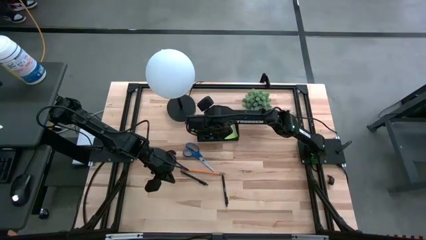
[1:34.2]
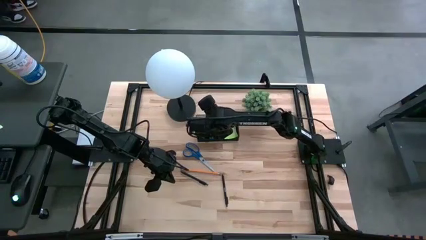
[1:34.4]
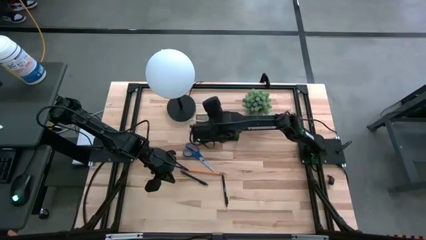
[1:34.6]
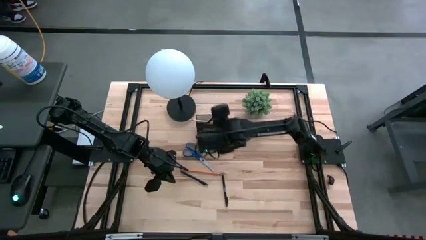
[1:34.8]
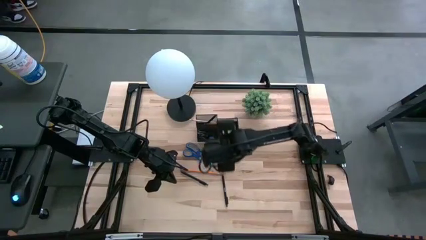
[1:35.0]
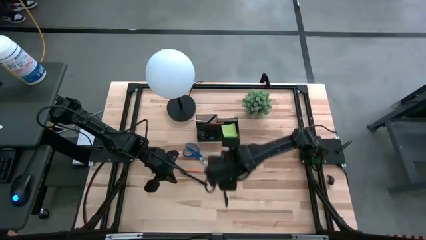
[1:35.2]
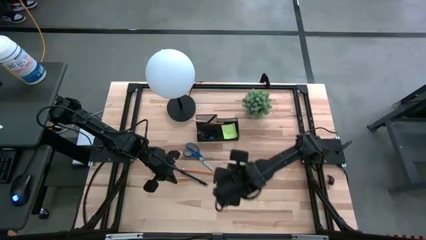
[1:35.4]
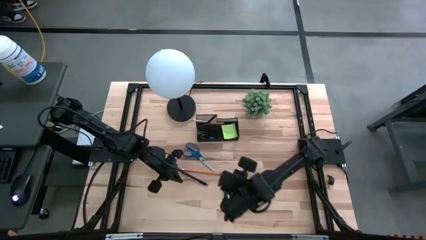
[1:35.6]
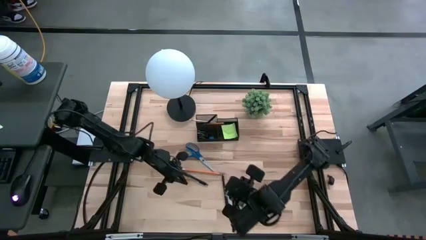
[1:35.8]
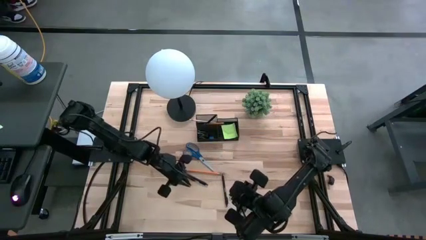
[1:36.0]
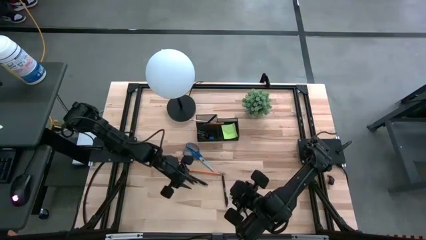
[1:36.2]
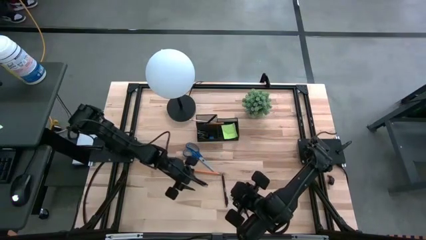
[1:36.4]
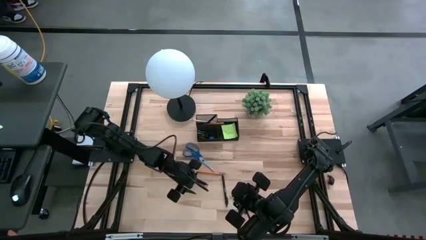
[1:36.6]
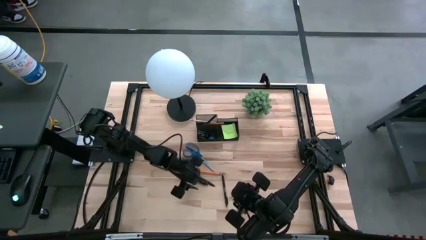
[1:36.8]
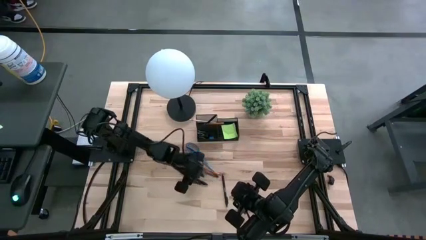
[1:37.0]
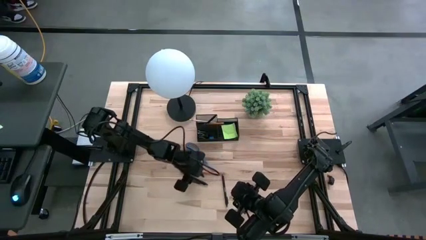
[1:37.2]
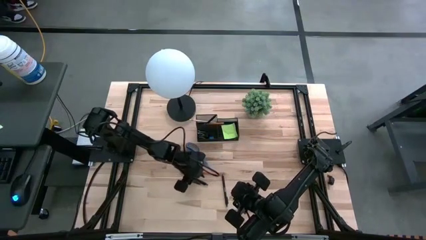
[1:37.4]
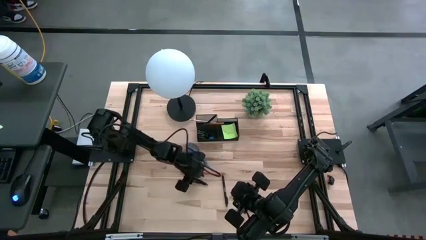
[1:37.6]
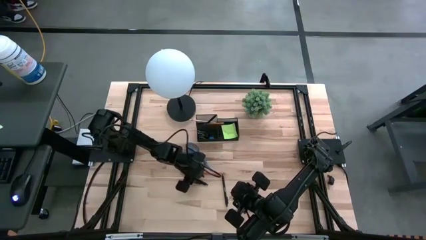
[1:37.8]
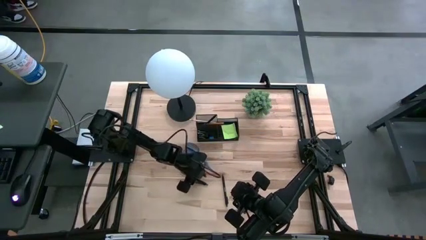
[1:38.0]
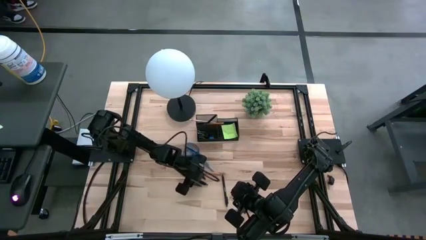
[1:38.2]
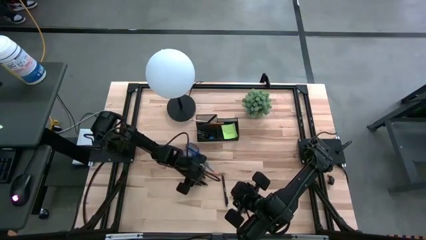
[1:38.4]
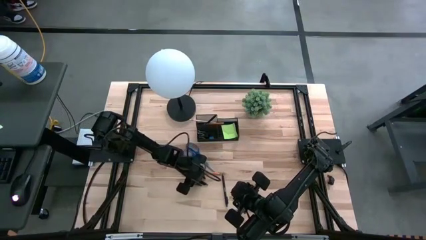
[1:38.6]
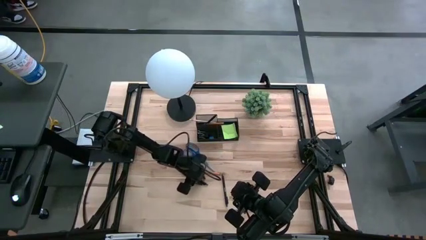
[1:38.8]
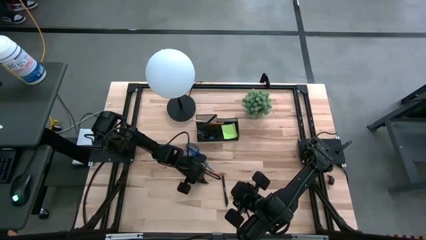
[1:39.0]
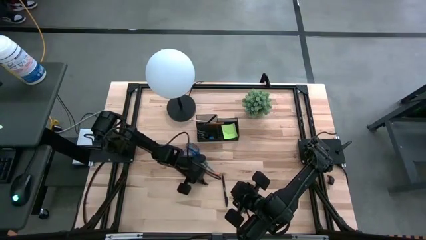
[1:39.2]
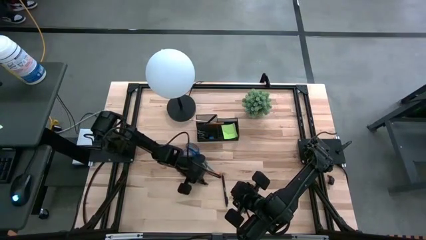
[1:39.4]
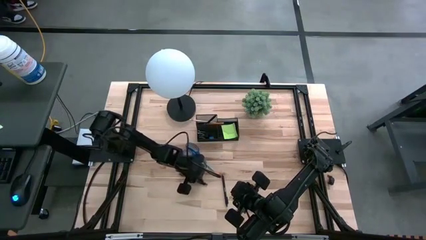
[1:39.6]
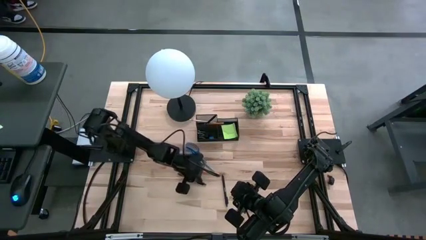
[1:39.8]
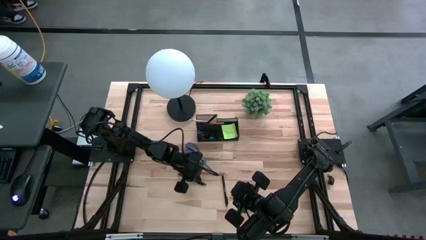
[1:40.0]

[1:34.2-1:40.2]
Task: Pick and place office supplies into organizer
Put the left black pen into the desk organizer

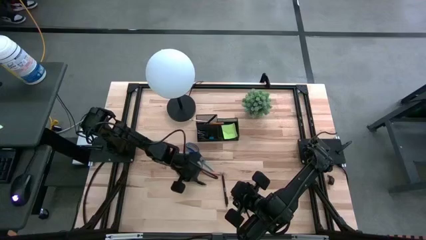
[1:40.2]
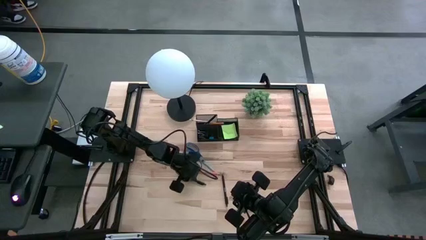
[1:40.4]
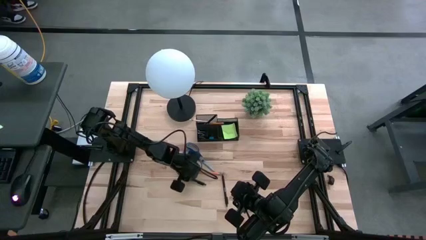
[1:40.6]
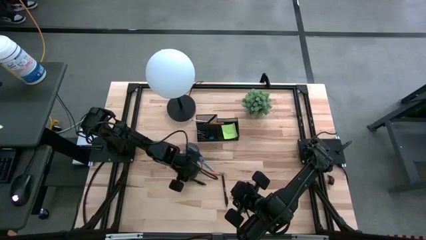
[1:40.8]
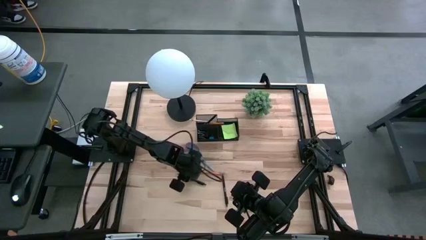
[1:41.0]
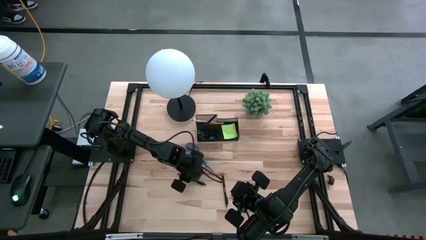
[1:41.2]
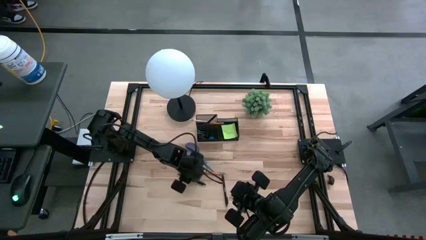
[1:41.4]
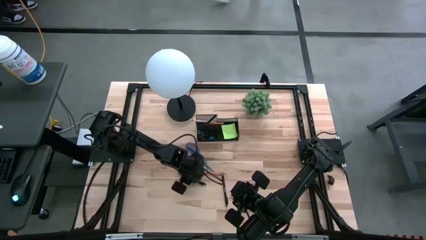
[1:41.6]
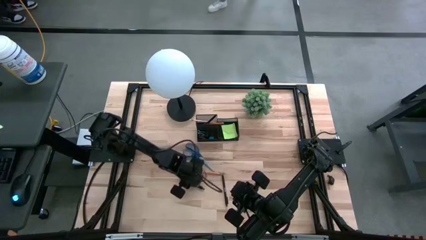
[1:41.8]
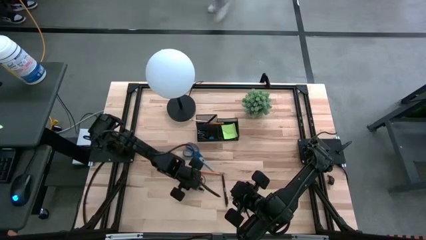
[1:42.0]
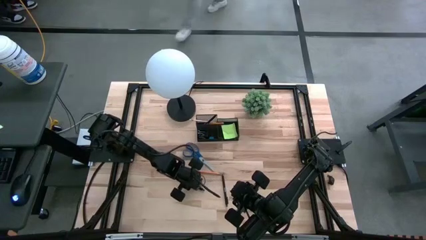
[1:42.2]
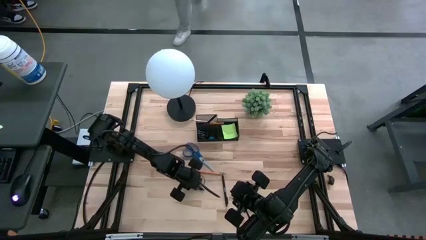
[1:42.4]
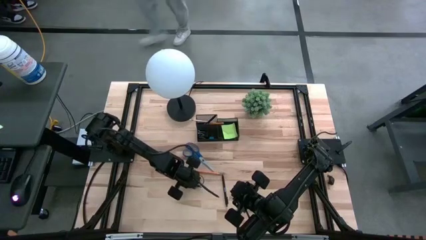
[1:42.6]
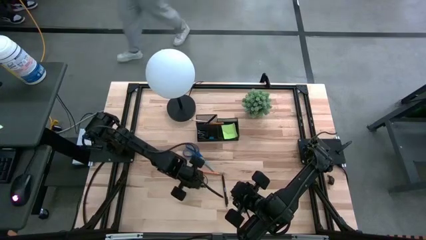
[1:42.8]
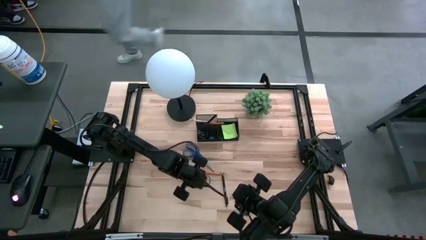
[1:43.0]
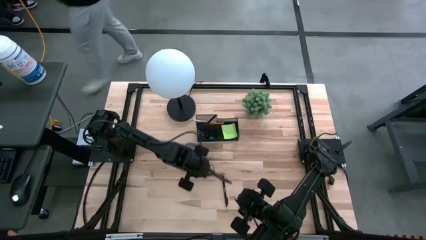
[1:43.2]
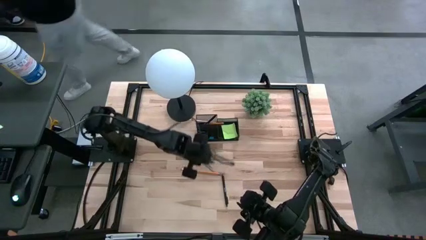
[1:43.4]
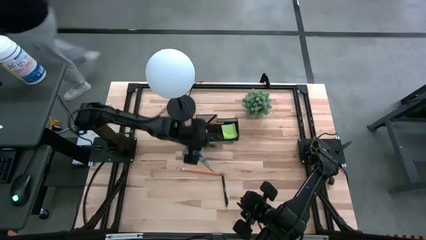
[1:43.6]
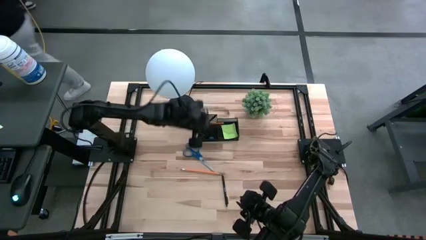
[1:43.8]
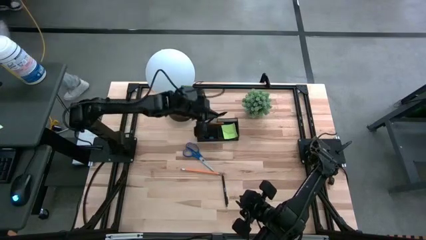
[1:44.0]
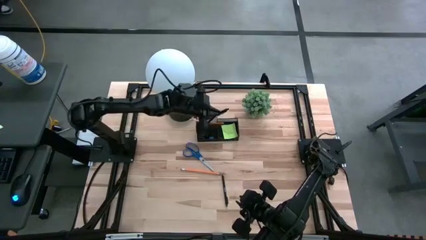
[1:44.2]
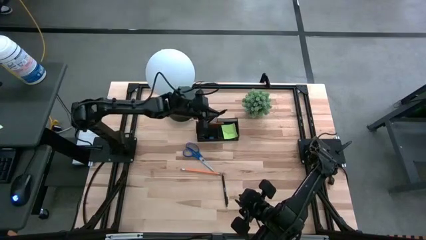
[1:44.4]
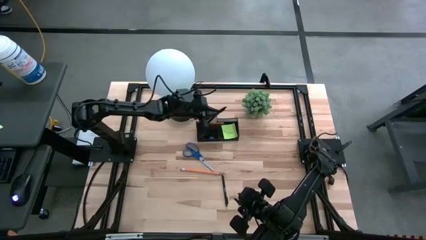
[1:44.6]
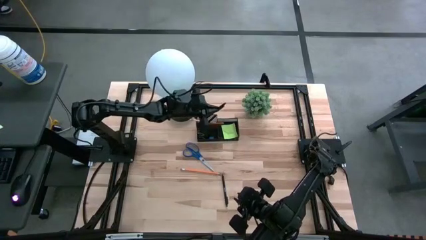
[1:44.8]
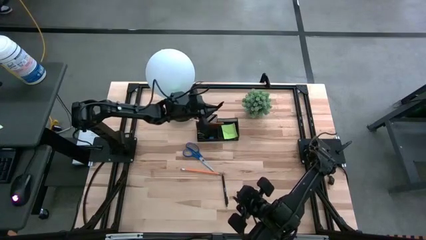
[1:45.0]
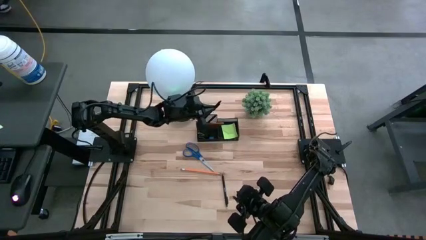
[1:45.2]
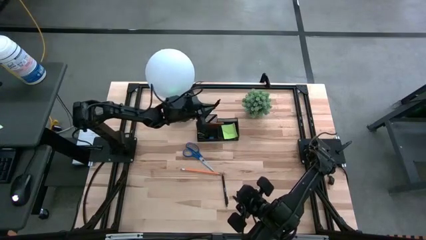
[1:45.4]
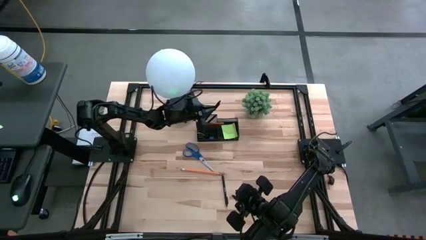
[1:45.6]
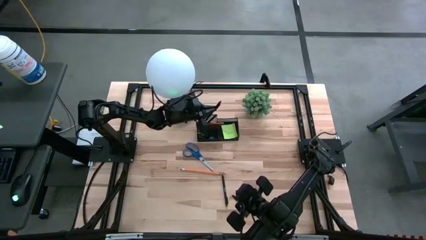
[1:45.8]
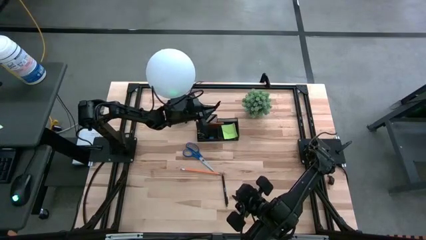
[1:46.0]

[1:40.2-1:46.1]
Put the left black pen into the desk organizer

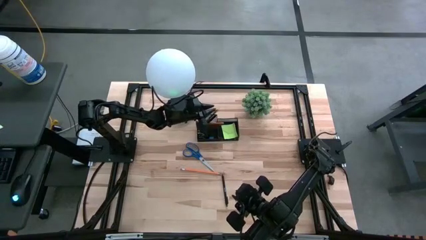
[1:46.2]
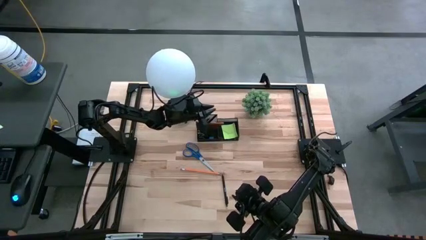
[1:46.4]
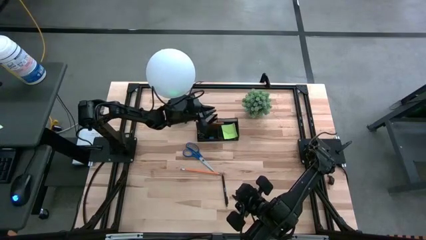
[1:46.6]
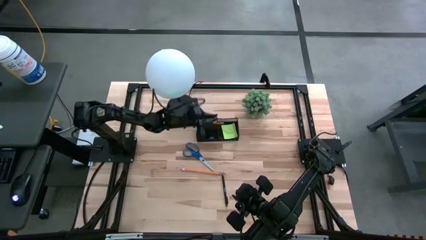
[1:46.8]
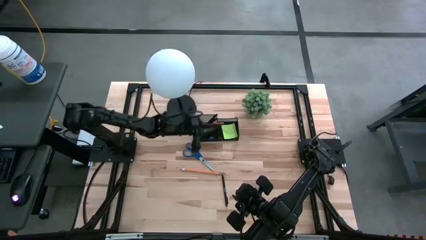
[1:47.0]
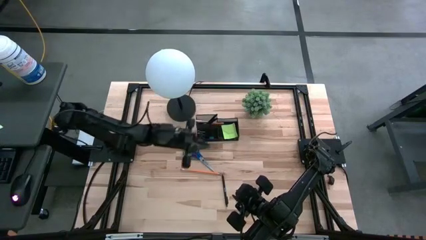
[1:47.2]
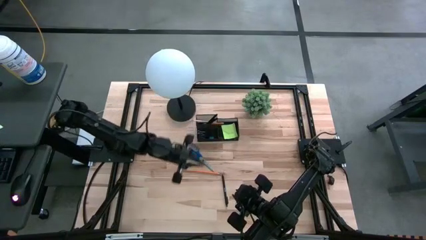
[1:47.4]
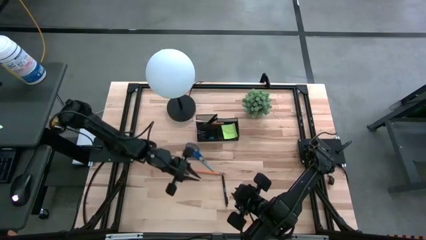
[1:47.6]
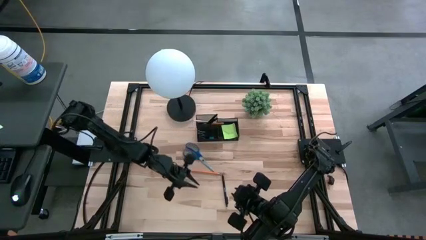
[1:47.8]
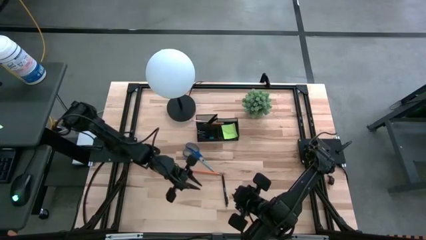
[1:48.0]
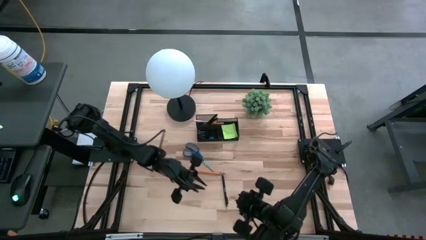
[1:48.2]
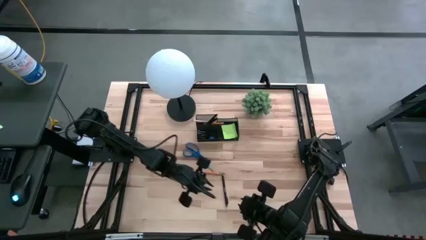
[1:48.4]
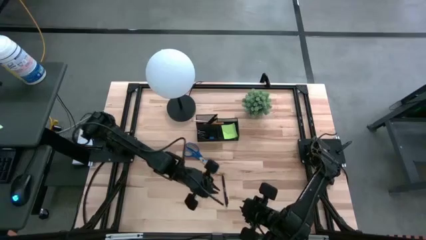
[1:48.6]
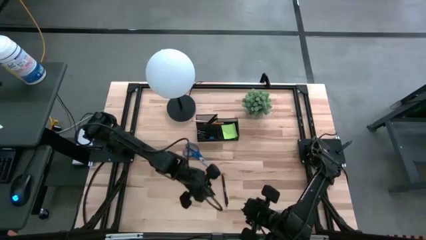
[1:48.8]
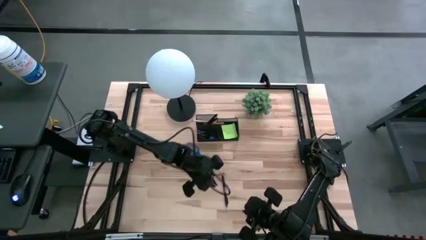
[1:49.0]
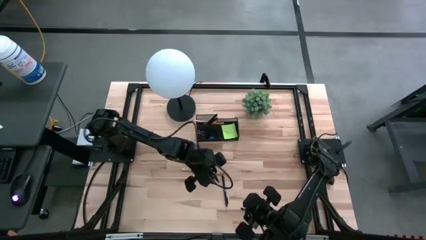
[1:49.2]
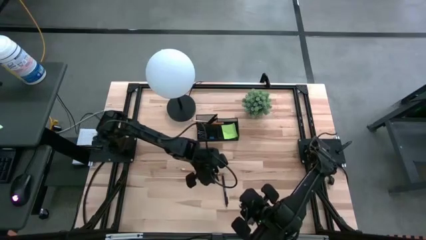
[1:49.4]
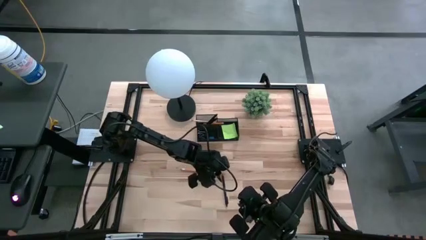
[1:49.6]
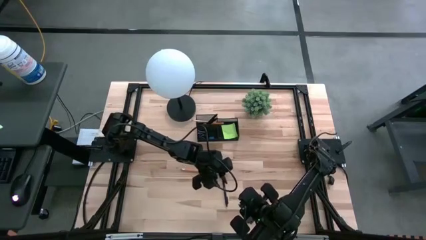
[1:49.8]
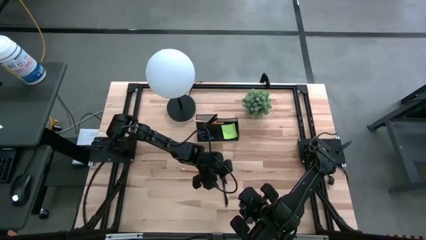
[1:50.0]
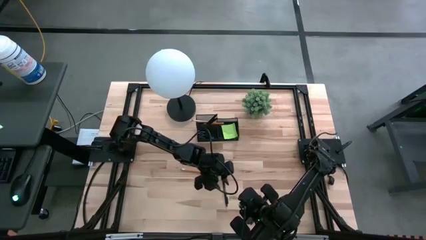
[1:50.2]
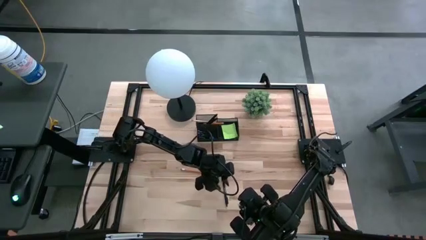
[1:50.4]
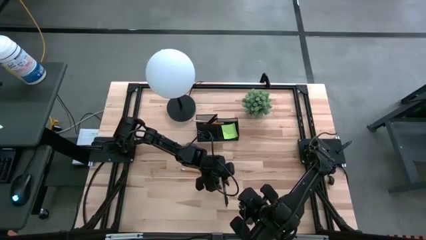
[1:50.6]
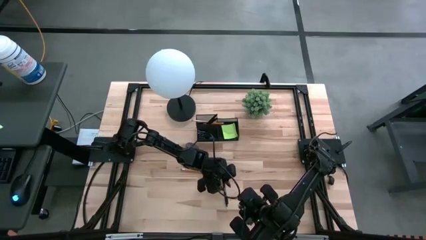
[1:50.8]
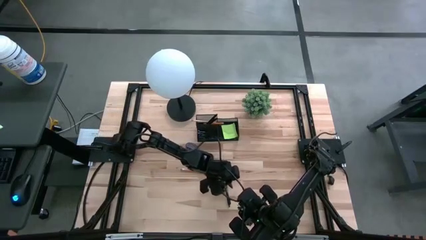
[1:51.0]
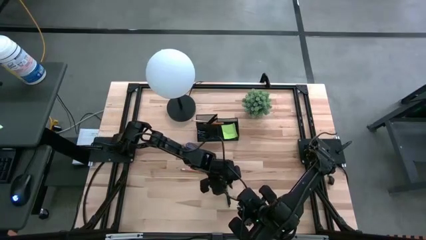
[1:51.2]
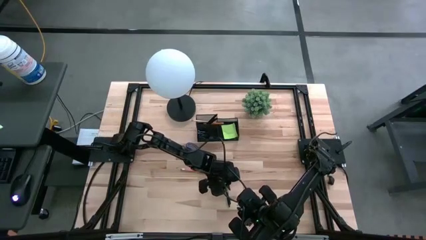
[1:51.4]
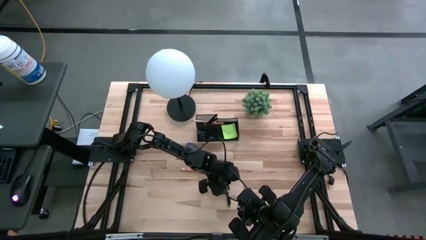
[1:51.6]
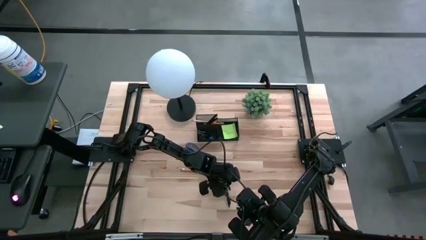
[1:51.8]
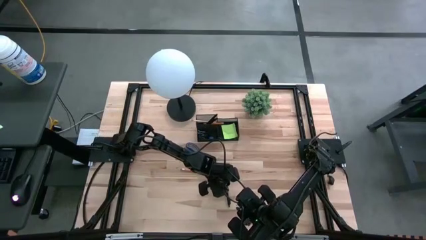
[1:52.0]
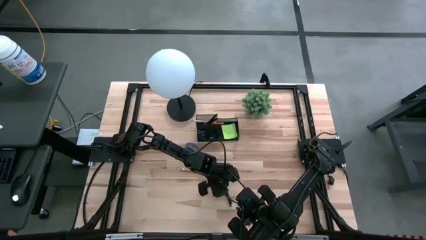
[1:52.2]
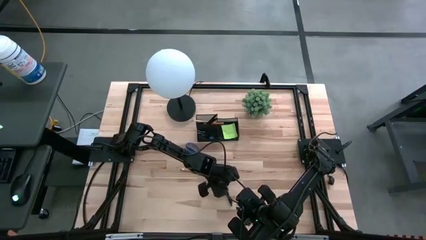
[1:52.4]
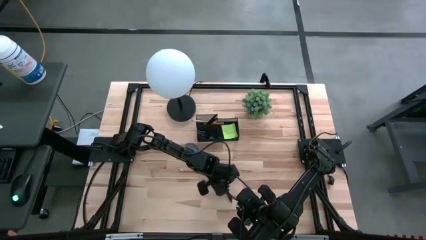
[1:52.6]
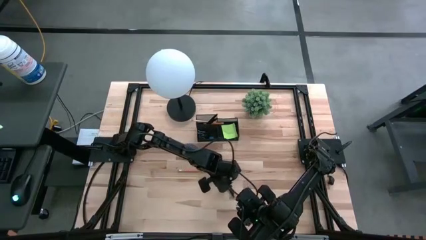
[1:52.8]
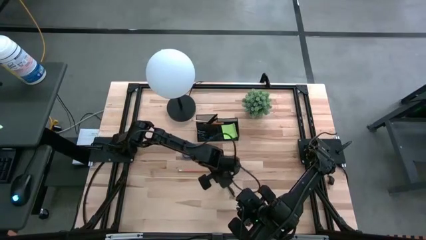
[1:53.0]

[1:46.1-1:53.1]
Put the black pen into the desk organizer
